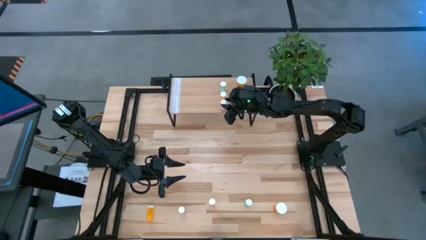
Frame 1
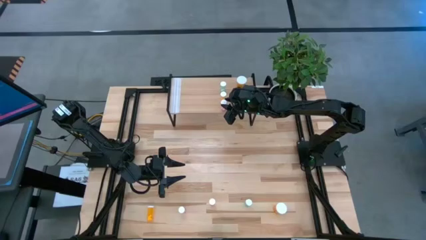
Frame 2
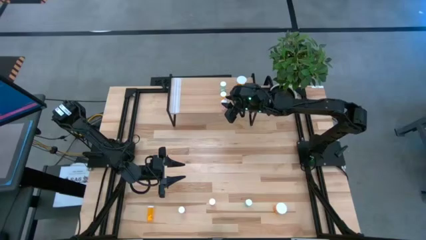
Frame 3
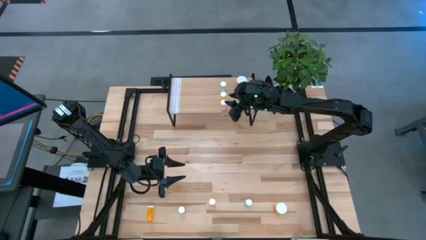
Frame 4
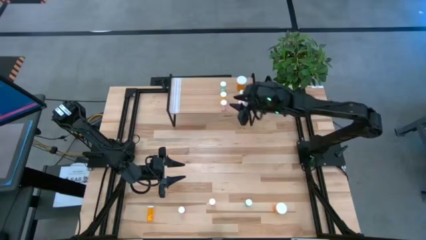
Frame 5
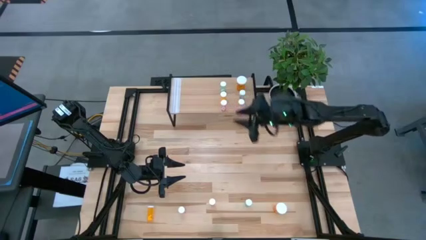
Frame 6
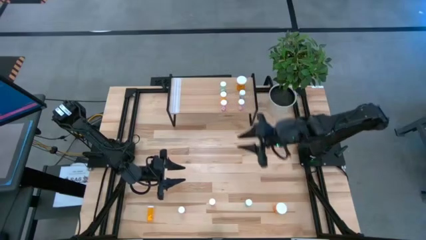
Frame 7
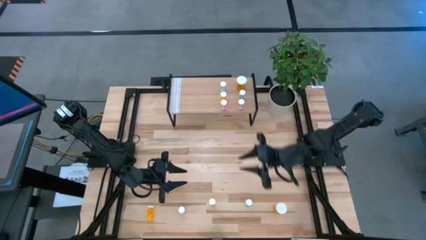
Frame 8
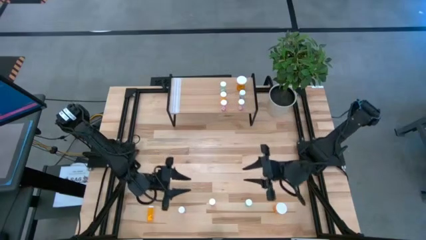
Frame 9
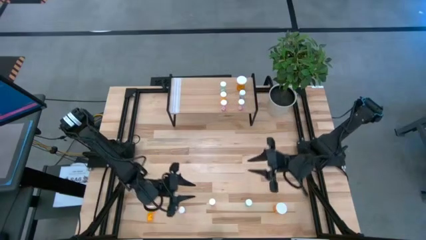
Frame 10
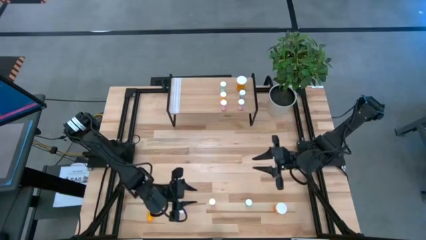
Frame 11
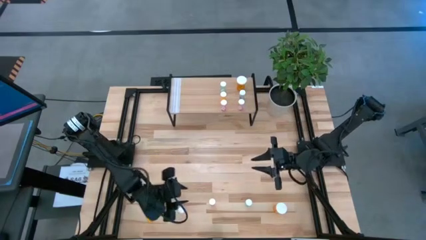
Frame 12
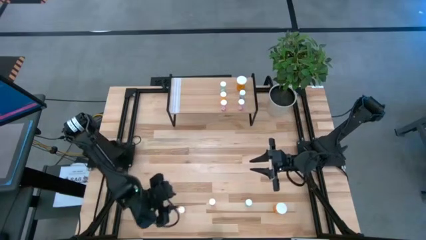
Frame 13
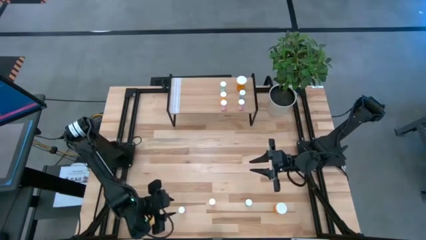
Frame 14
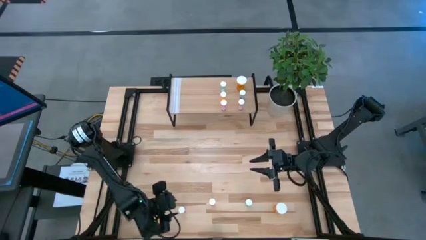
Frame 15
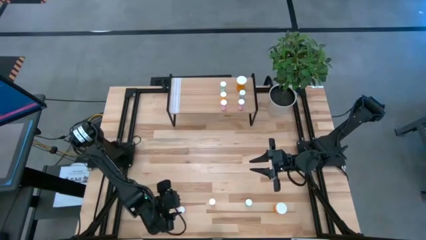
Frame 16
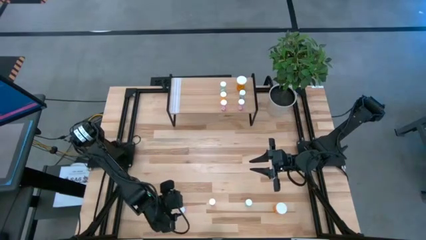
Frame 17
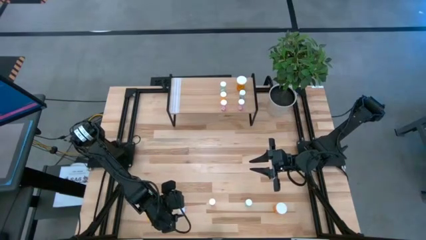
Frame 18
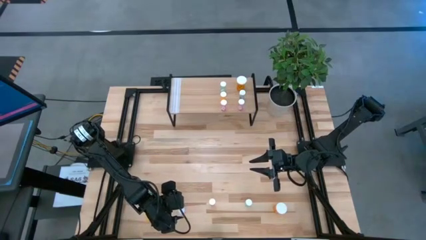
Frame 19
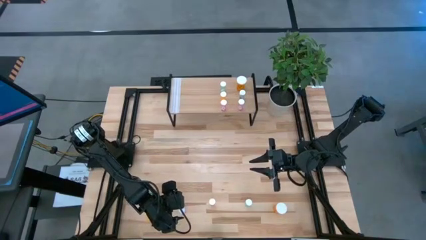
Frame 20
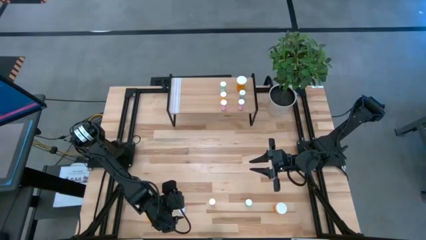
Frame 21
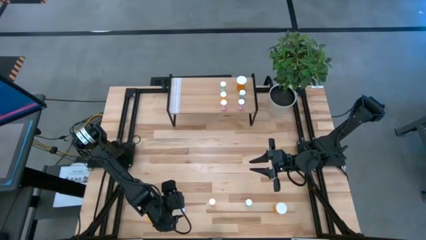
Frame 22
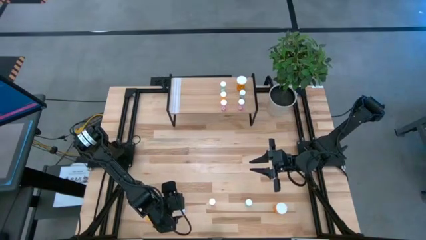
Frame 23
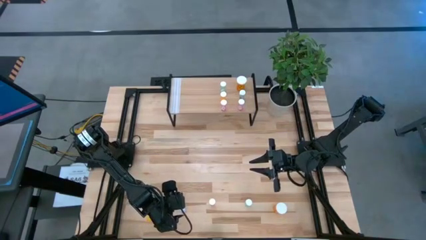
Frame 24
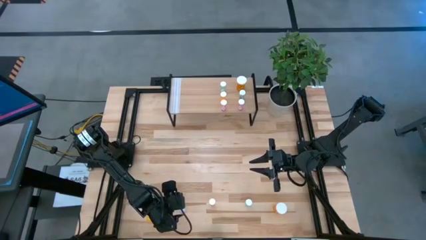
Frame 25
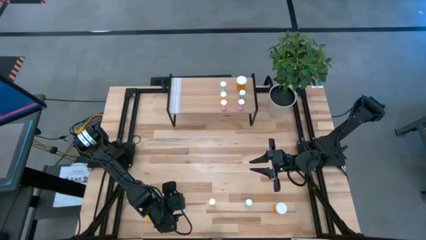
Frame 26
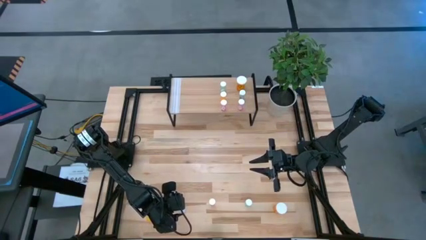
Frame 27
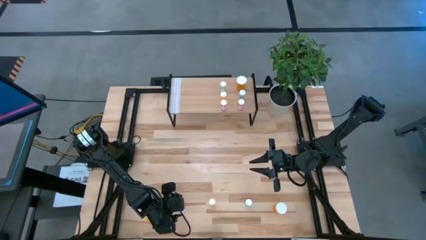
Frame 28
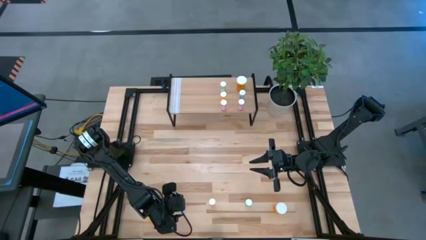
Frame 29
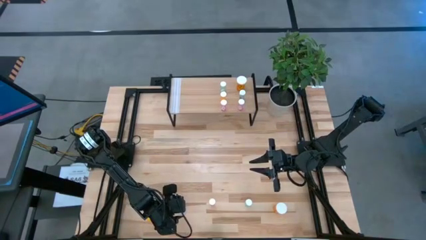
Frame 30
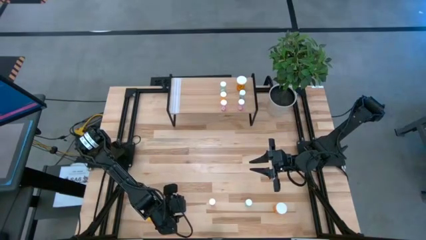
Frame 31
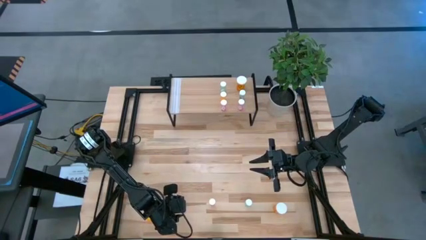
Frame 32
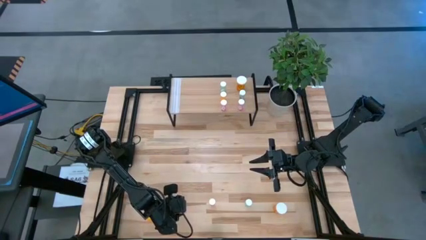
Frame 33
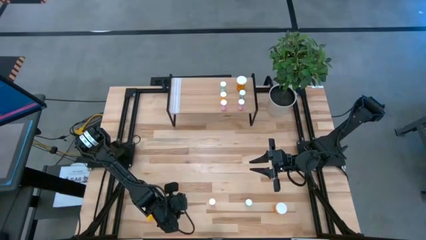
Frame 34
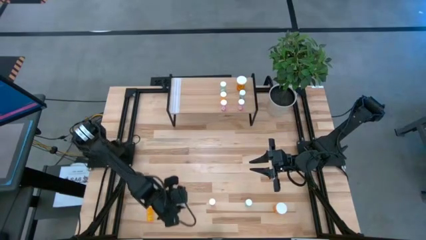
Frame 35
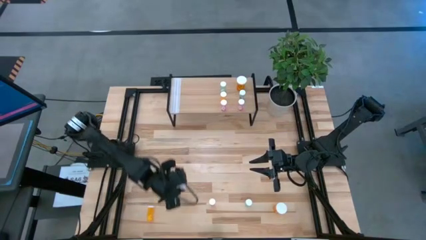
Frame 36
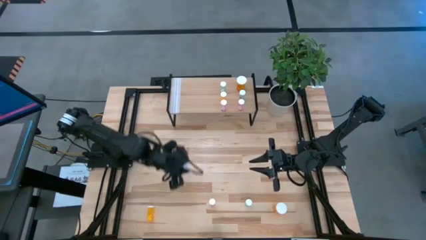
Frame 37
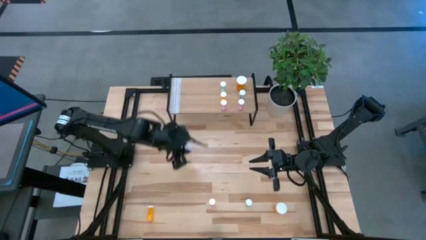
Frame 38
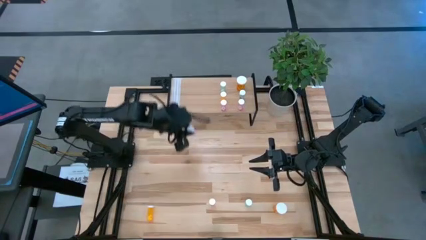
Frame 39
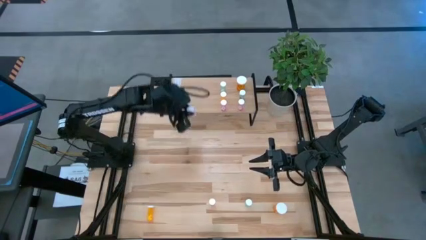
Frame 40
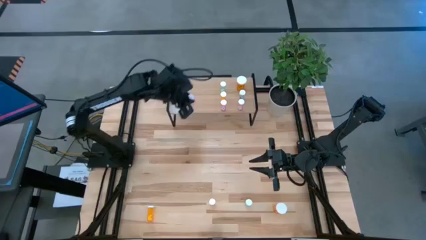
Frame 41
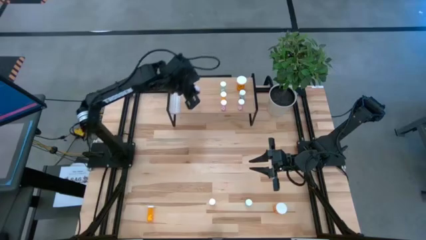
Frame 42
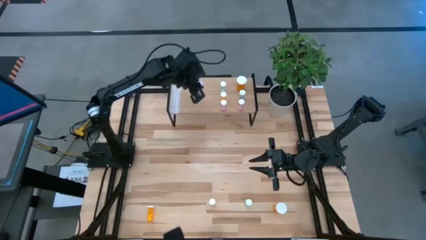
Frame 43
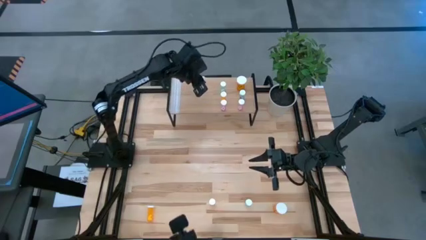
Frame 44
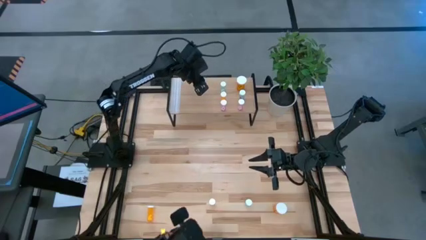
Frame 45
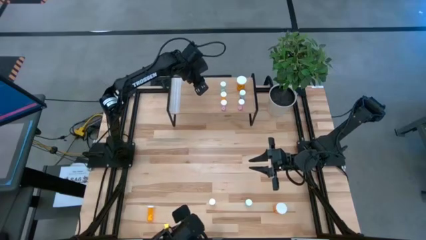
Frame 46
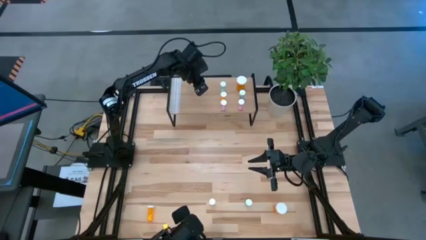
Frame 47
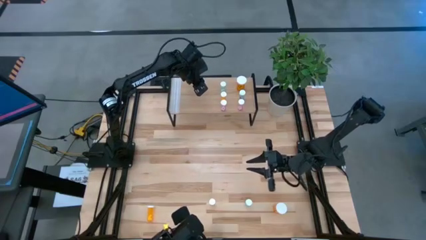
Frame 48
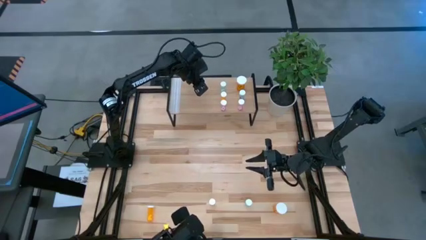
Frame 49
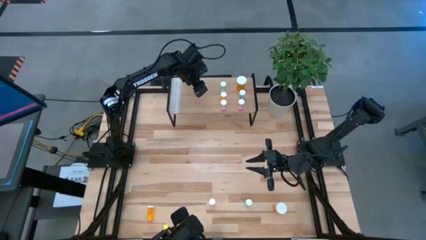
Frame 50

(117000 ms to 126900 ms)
Task: Pick and place medicine bottles onto shelf by color
Put the small purple pill bottle on the shelf

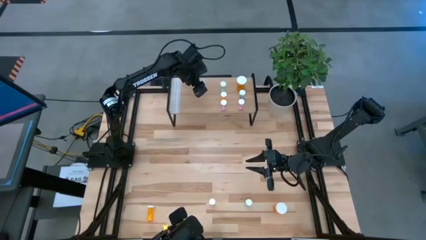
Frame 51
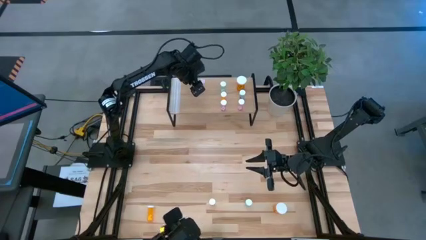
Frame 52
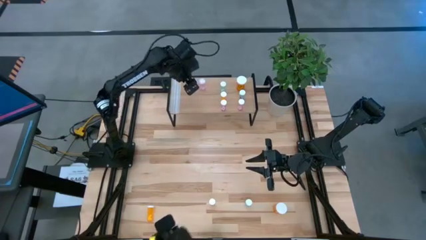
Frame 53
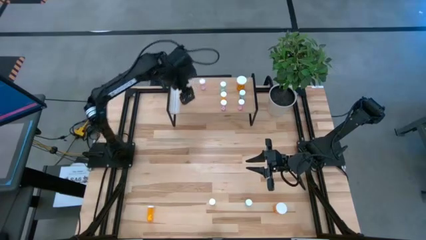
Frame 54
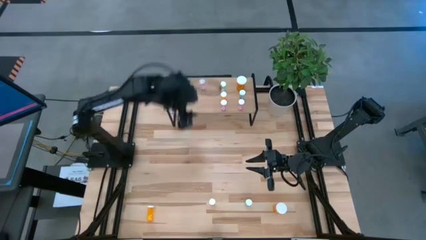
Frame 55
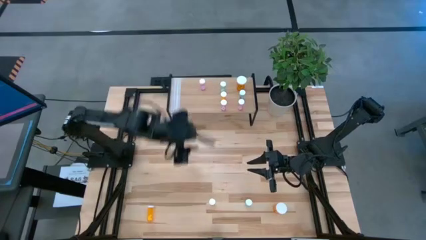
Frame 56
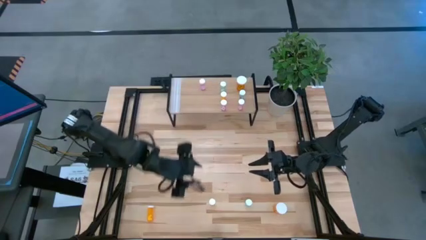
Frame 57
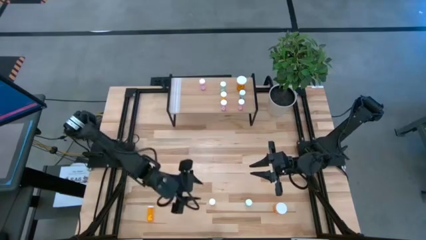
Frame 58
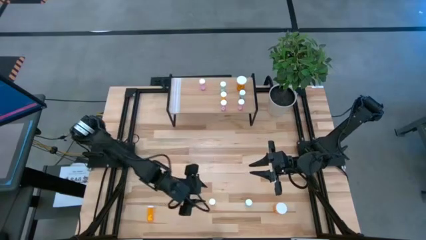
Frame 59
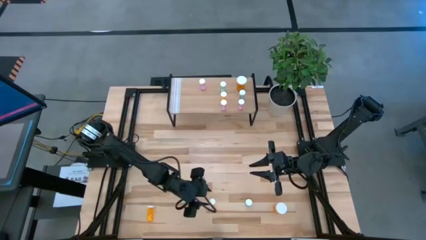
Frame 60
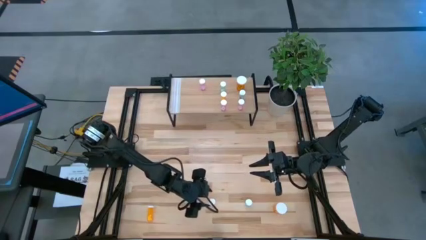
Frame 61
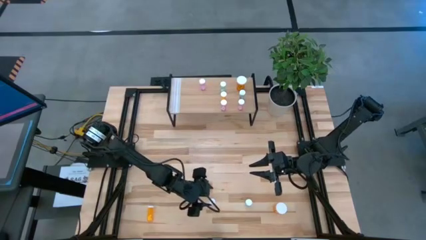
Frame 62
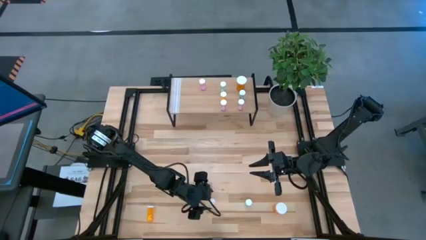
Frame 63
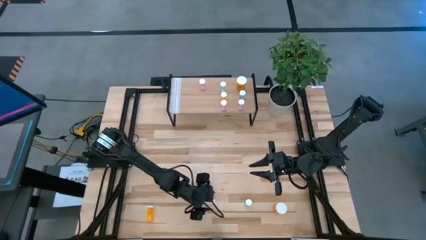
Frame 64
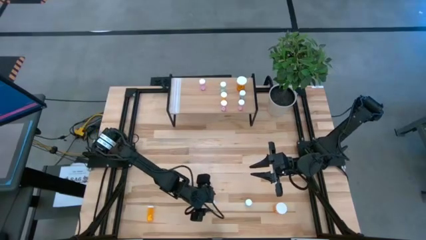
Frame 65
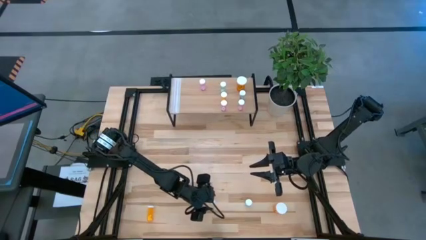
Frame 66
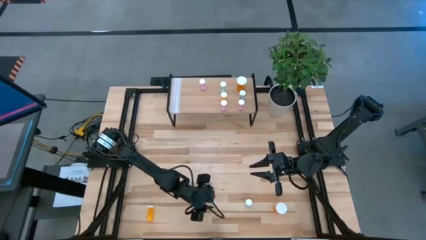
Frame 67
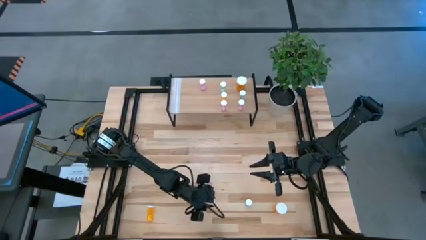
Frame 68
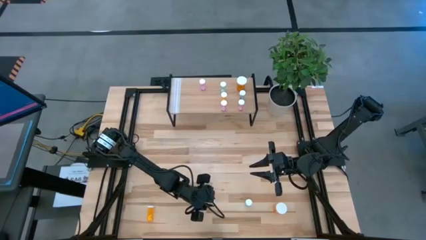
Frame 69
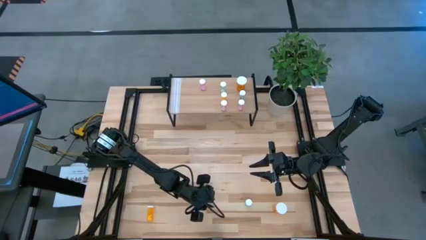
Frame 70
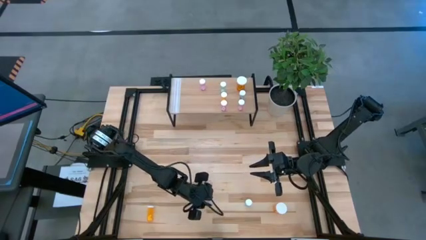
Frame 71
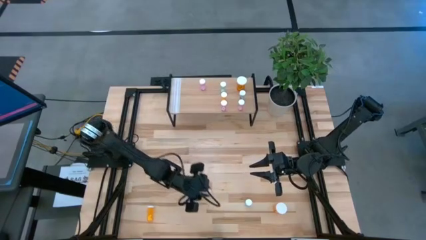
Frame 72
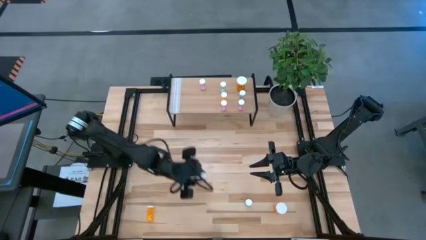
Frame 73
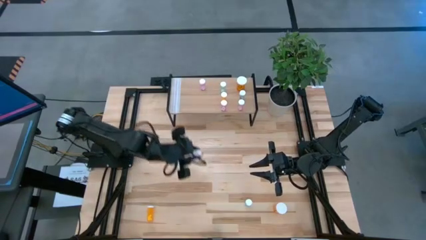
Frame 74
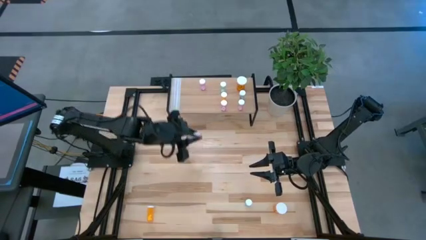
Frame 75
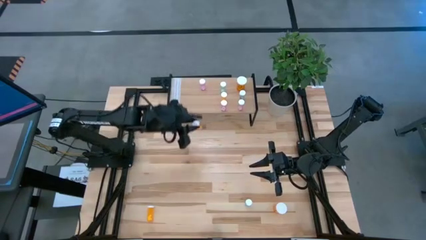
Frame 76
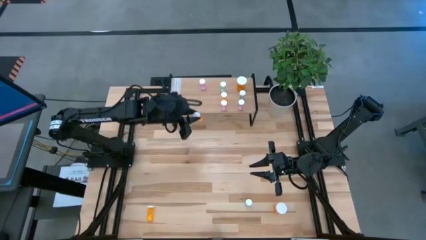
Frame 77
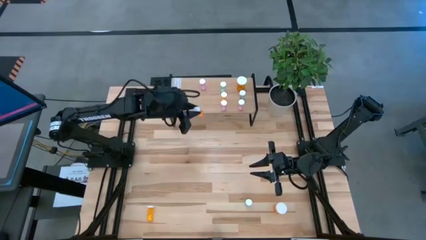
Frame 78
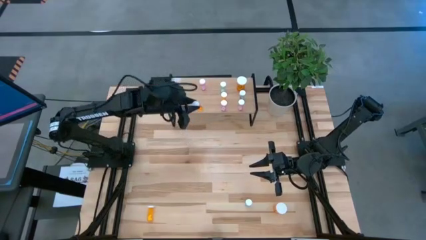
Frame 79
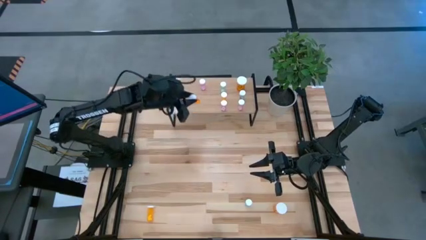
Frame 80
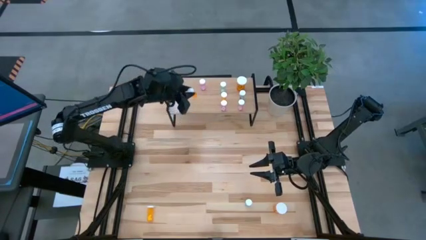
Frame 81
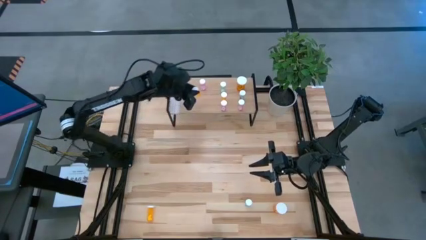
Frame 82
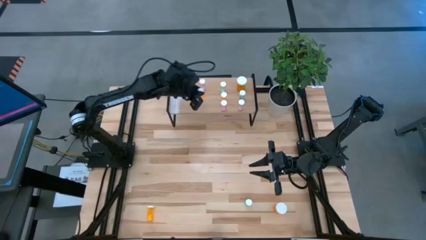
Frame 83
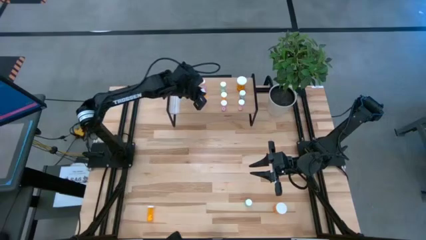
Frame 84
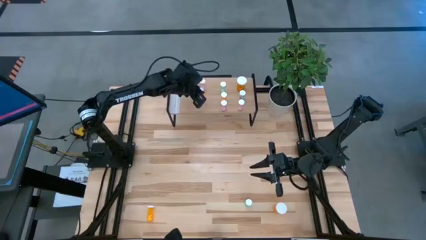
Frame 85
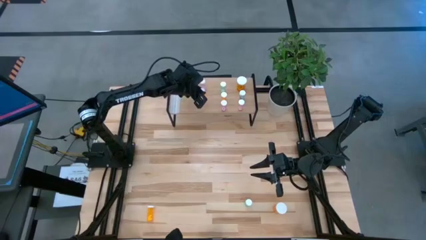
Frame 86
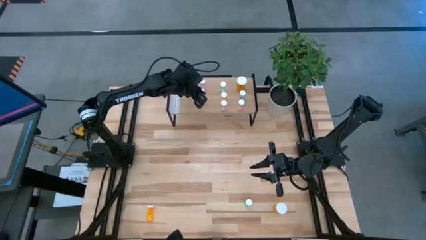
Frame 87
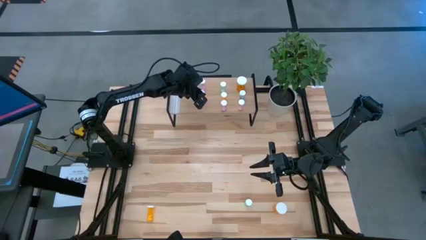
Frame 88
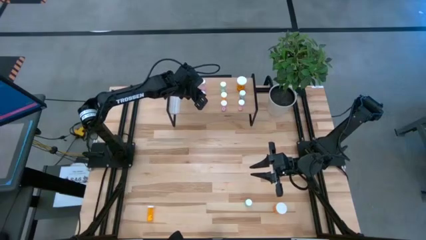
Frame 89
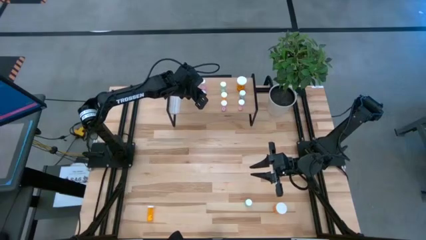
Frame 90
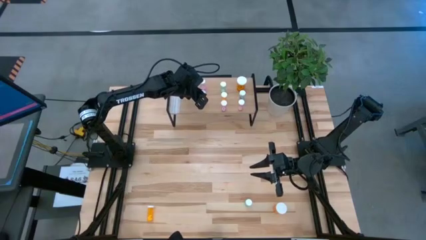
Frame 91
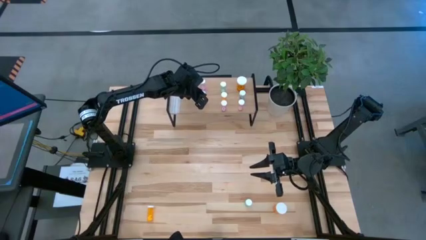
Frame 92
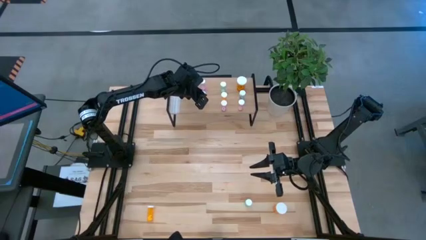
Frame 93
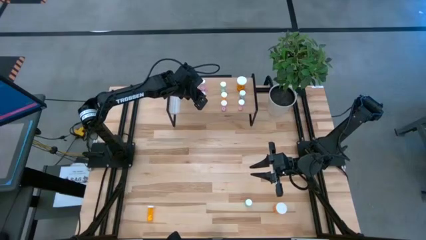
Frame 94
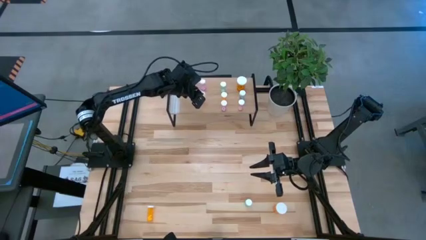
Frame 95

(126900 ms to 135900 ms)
Put the right small orange pill bottle on the shelf
